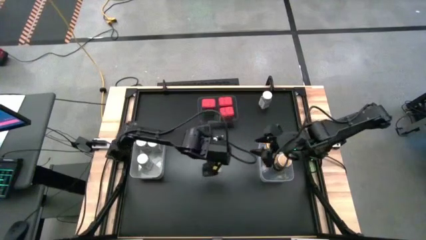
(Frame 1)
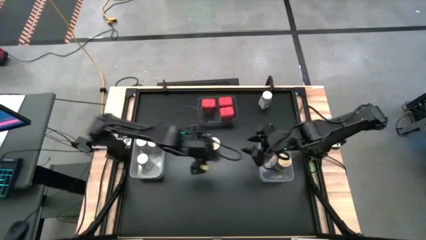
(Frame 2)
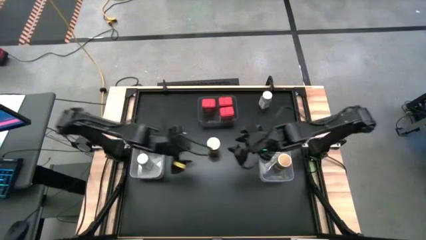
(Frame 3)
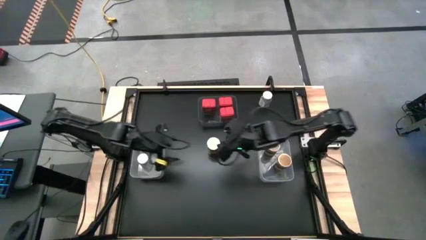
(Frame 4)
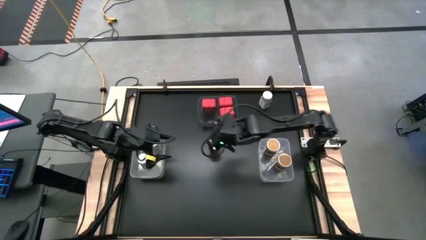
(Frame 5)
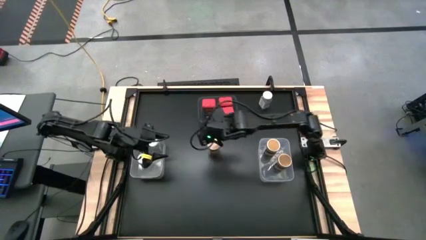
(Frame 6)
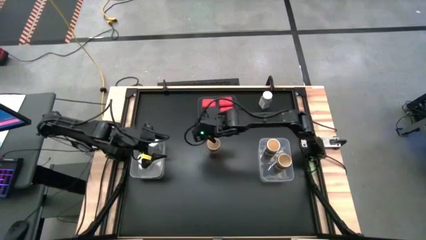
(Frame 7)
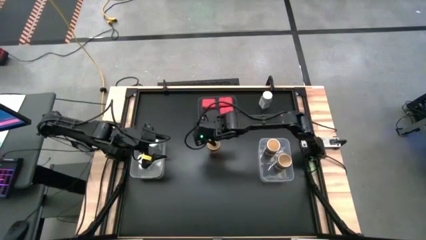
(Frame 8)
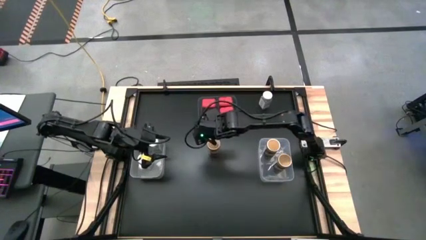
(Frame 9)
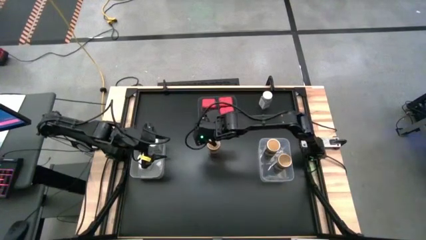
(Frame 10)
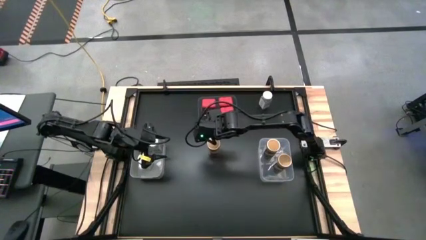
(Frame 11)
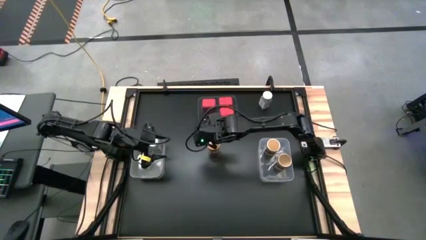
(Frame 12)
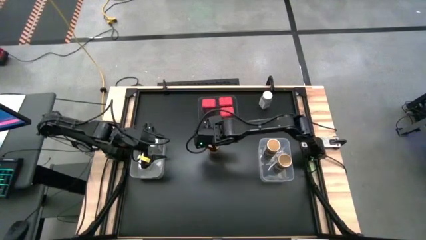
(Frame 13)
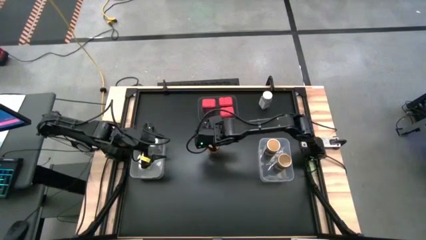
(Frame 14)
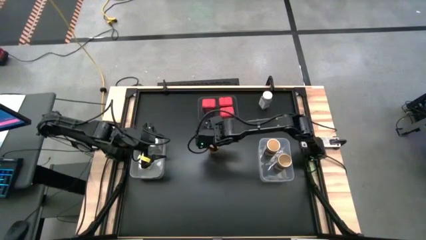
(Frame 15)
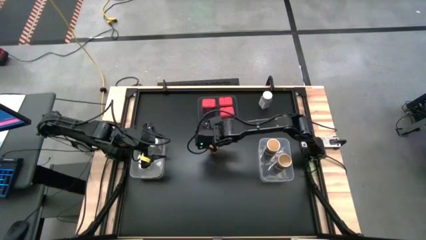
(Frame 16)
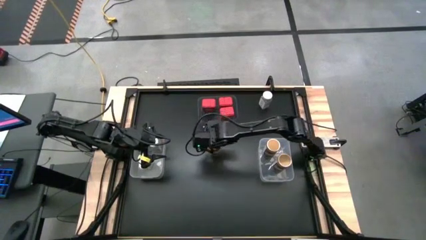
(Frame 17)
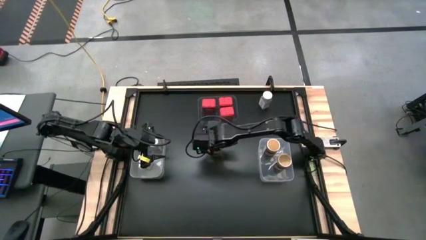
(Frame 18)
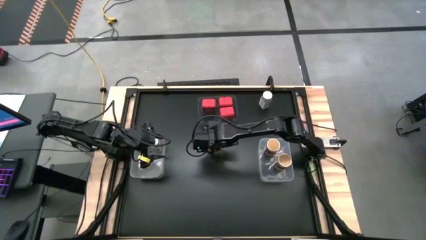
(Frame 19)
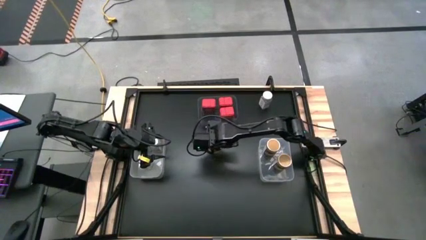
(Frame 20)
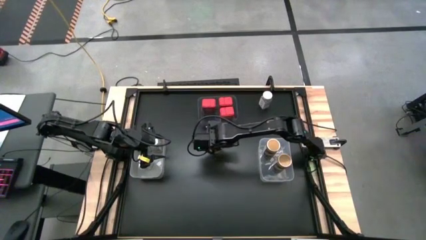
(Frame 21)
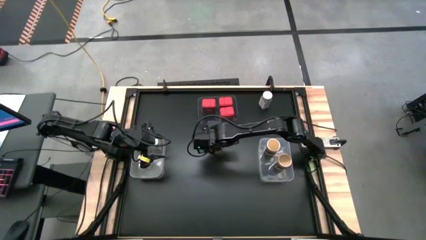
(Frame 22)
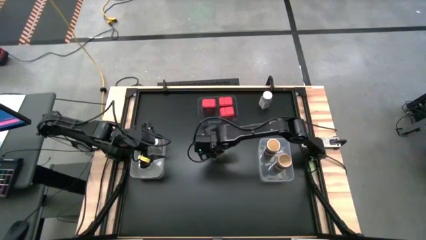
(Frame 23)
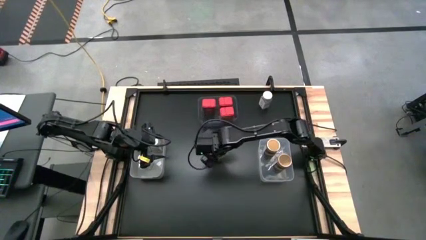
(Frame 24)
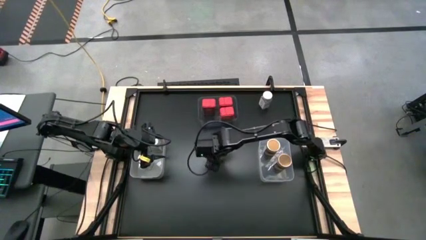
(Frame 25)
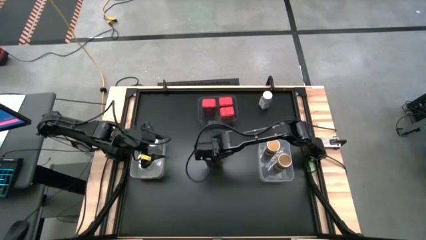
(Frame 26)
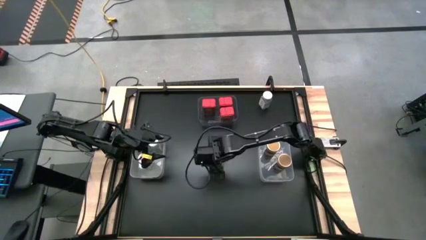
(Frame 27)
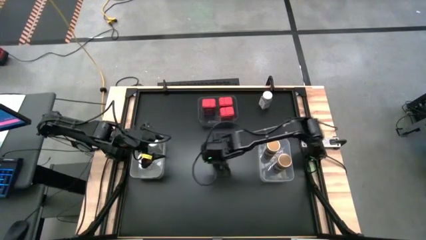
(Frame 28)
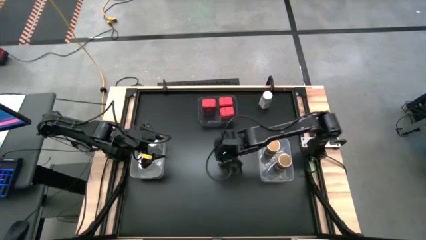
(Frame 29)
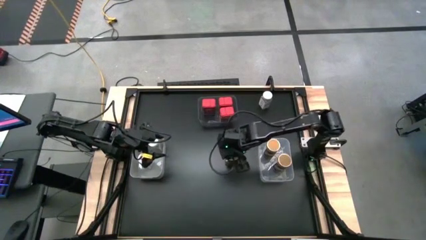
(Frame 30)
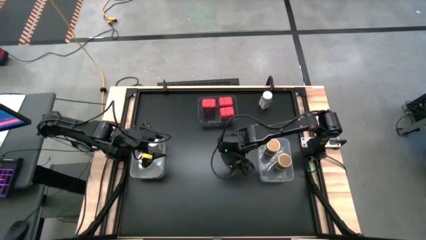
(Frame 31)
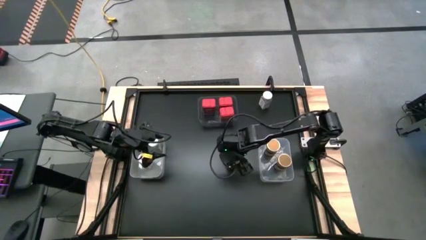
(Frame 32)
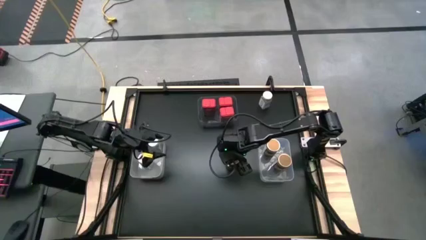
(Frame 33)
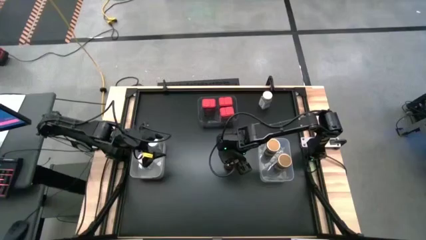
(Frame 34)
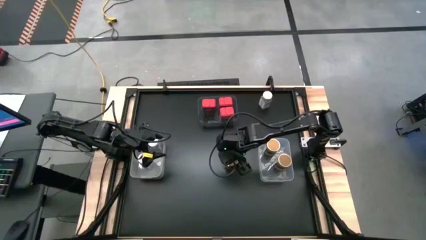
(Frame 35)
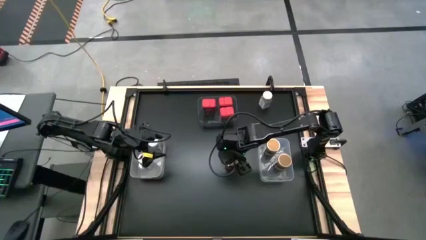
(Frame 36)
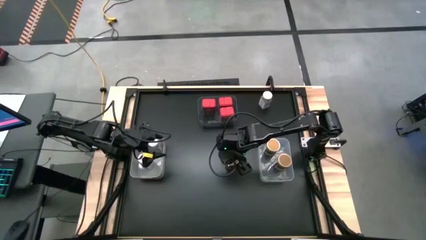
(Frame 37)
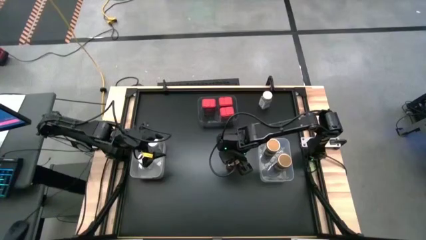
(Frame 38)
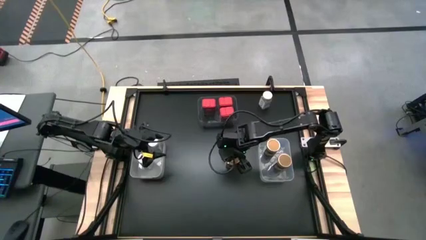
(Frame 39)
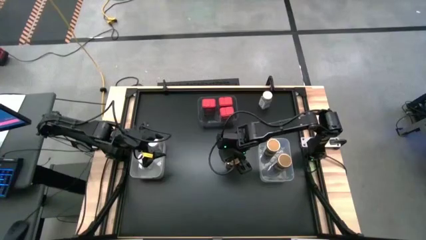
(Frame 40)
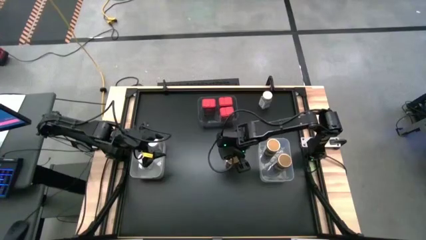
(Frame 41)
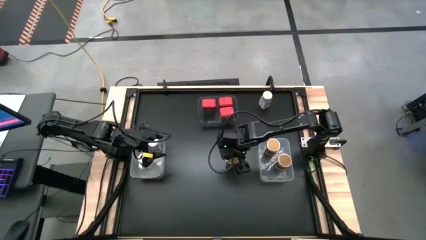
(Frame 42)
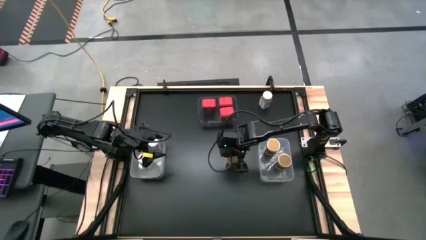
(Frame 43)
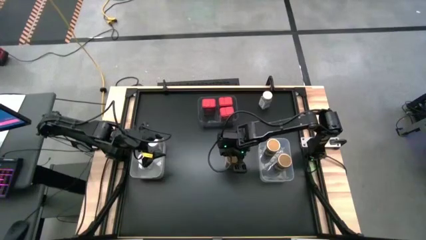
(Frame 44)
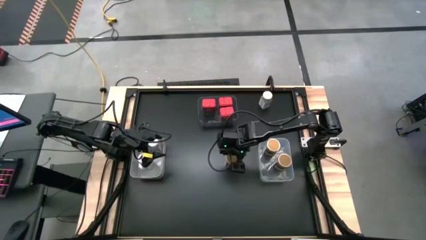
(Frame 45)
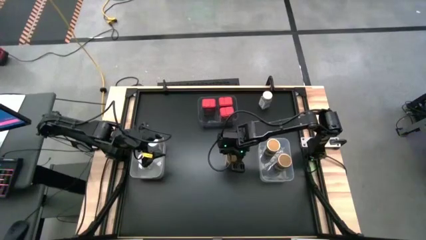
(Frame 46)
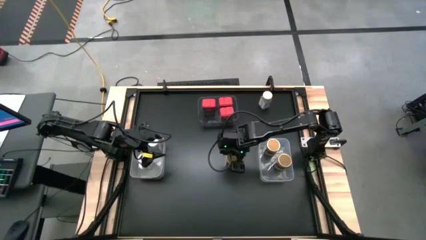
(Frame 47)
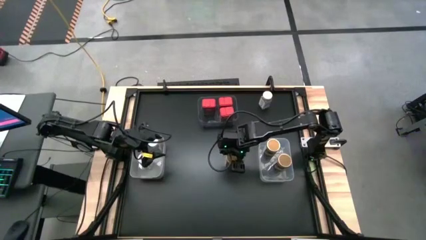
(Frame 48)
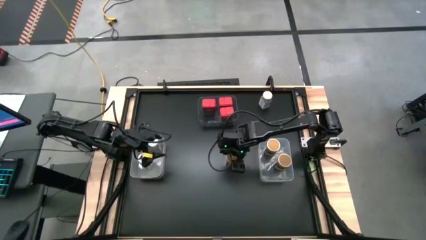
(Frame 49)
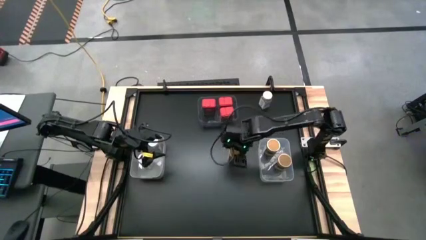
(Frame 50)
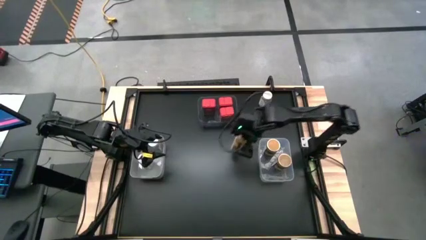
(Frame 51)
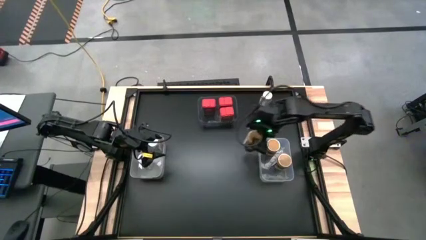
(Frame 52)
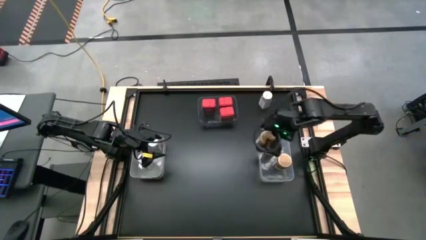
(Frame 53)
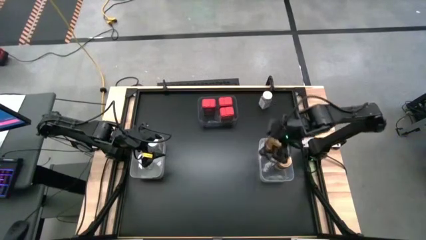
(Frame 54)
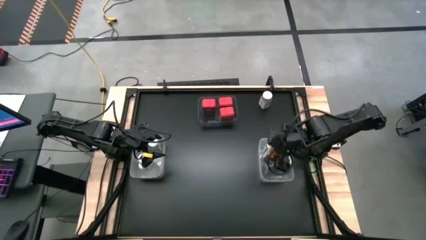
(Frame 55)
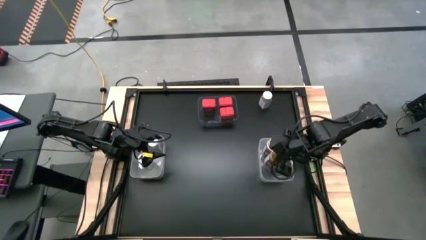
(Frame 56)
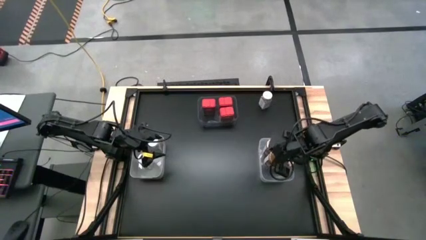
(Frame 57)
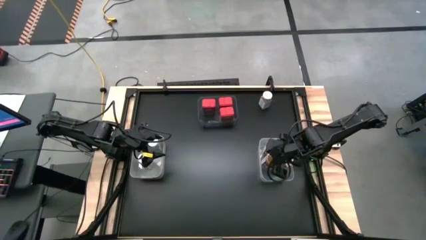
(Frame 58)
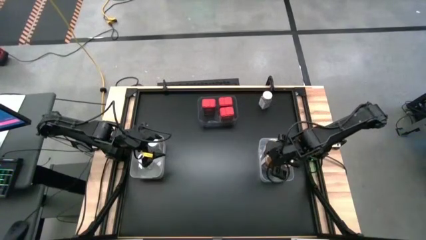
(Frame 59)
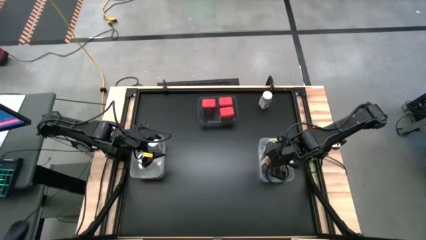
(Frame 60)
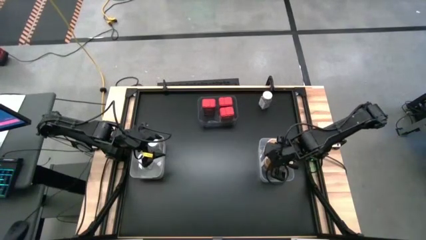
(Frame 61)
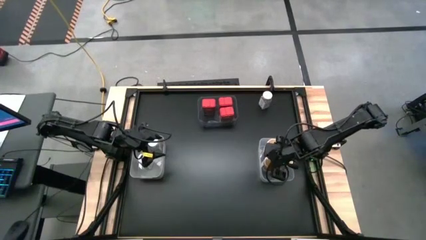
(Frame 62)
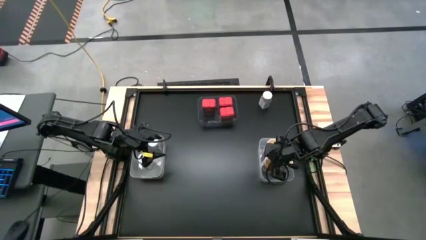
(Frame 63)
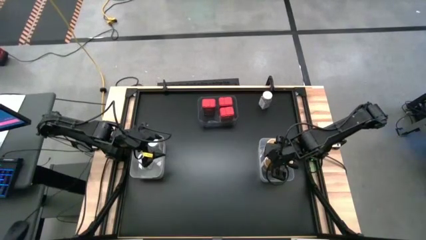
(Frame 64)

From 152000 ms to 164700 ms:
Task: Sort spices by type
Put the gold seasoning bottle into the transparent bin
